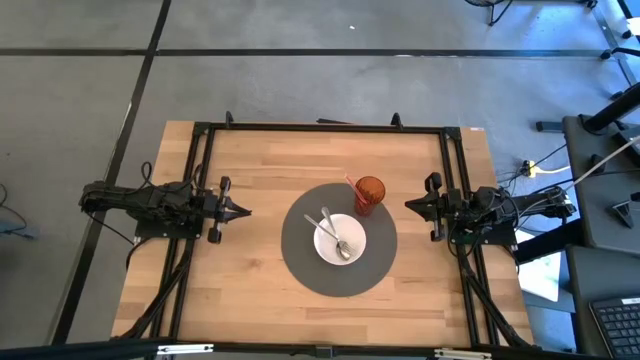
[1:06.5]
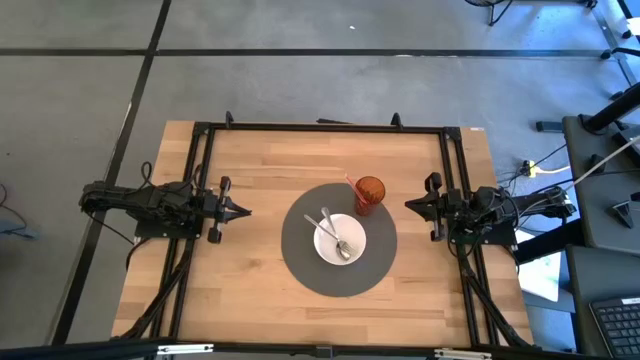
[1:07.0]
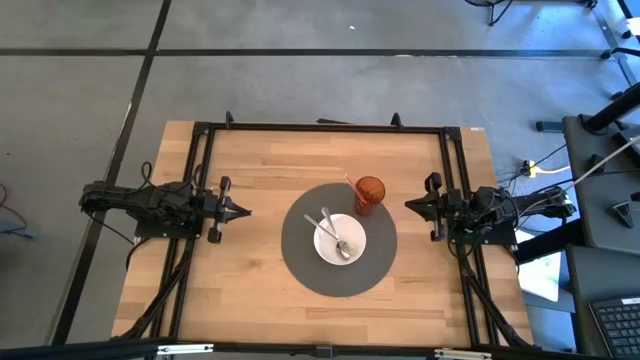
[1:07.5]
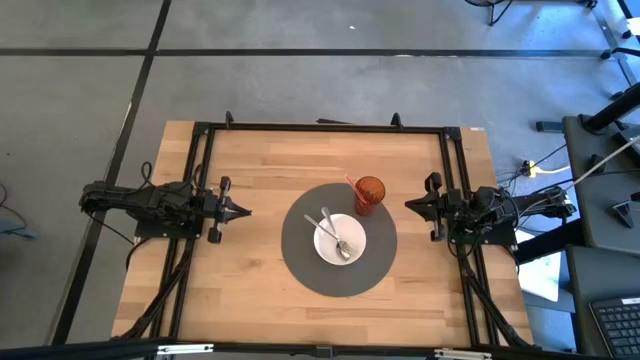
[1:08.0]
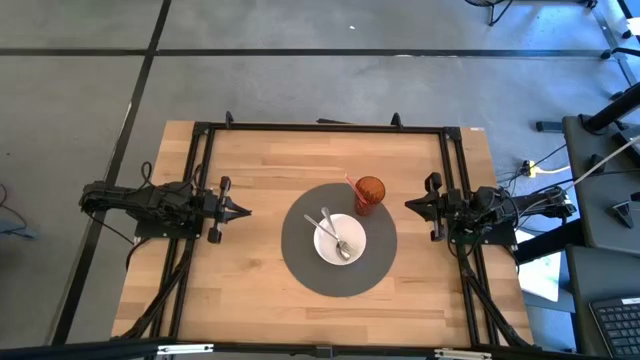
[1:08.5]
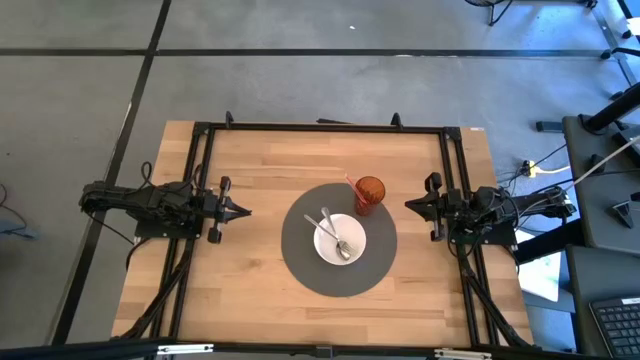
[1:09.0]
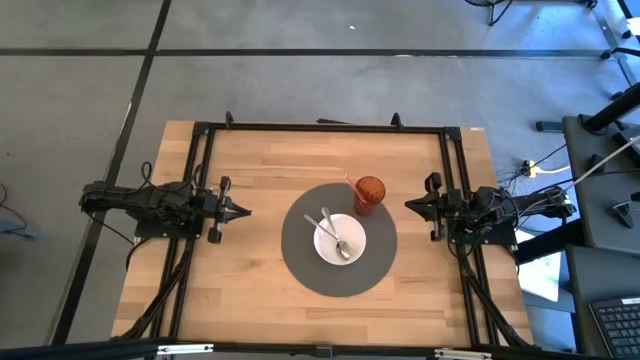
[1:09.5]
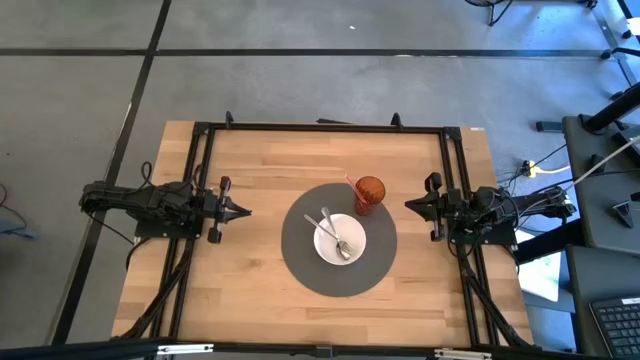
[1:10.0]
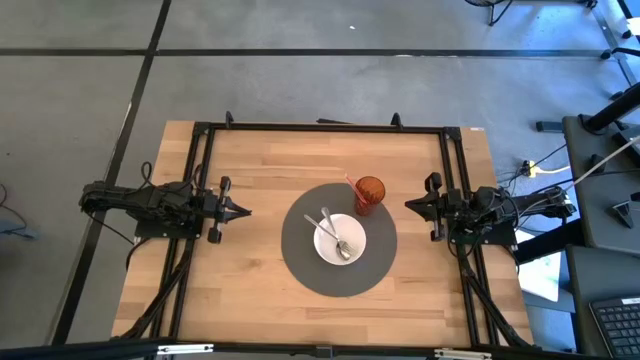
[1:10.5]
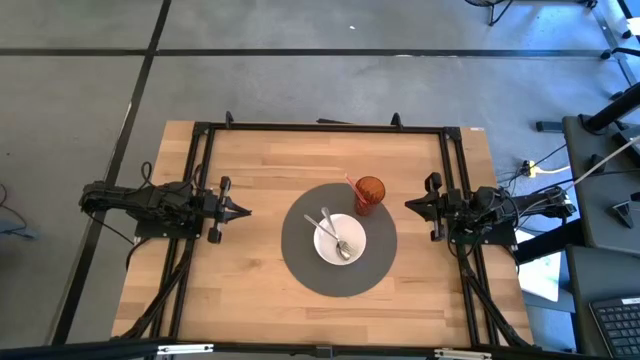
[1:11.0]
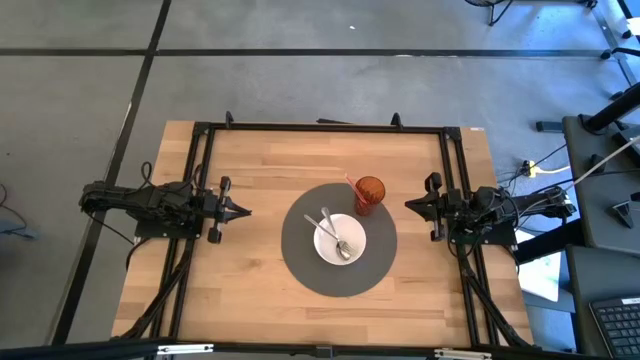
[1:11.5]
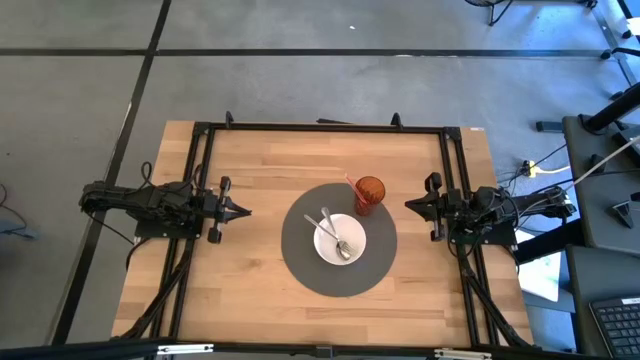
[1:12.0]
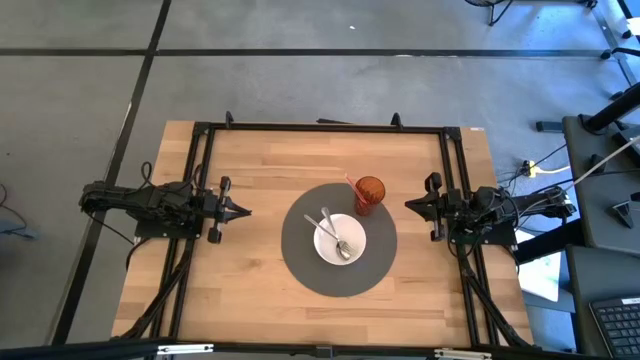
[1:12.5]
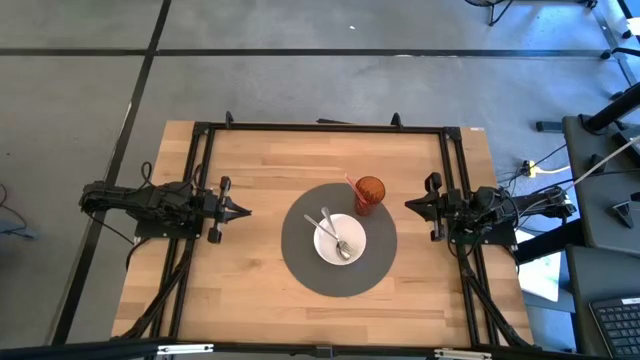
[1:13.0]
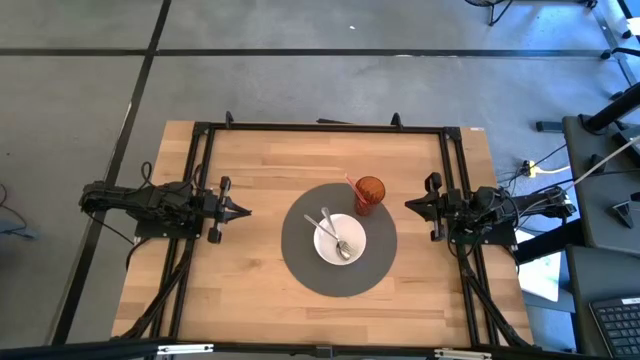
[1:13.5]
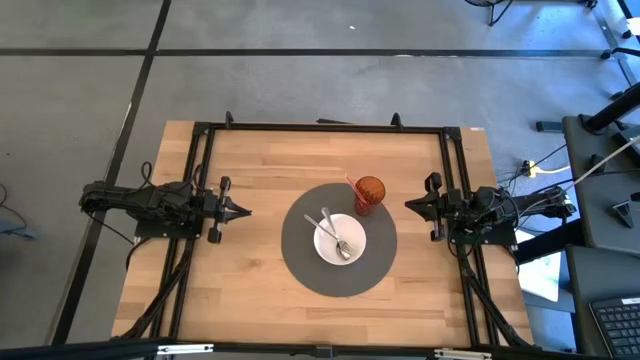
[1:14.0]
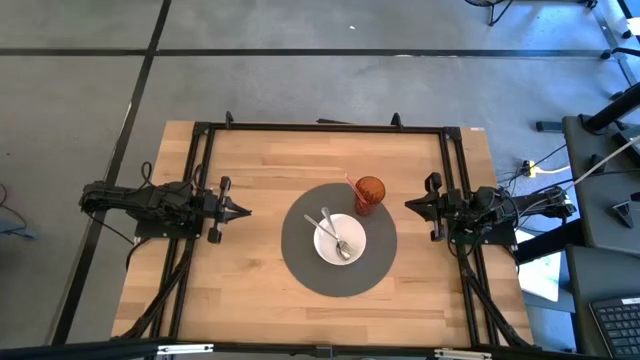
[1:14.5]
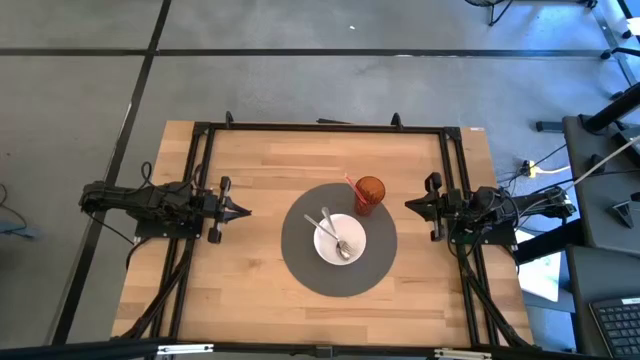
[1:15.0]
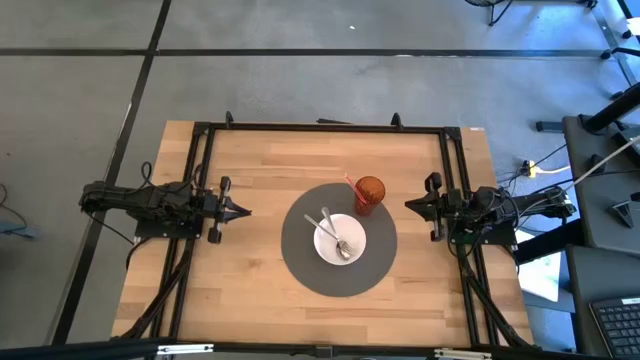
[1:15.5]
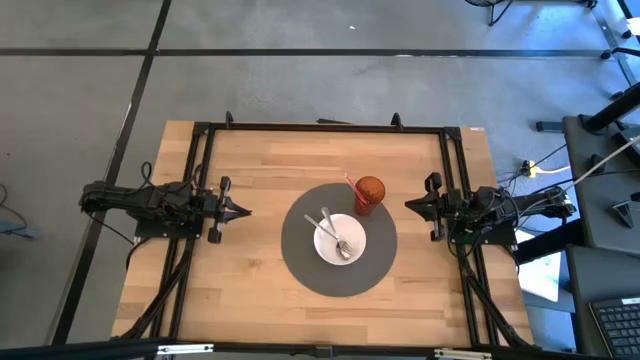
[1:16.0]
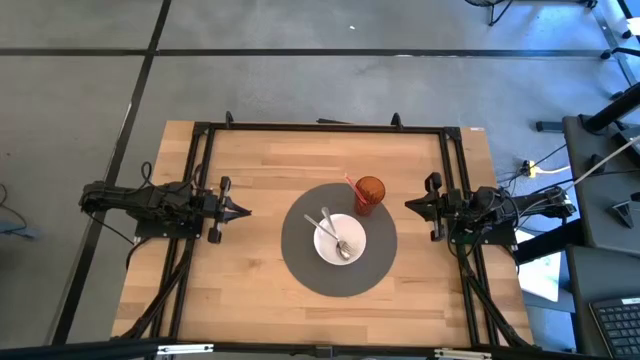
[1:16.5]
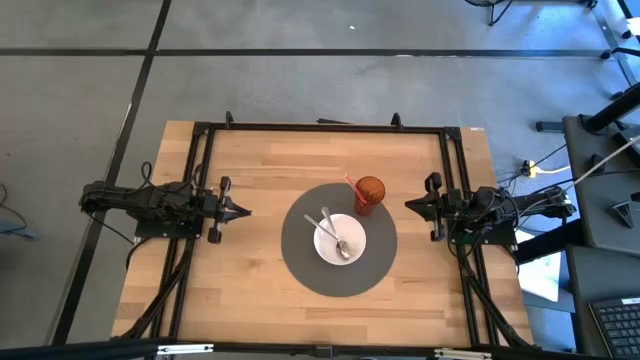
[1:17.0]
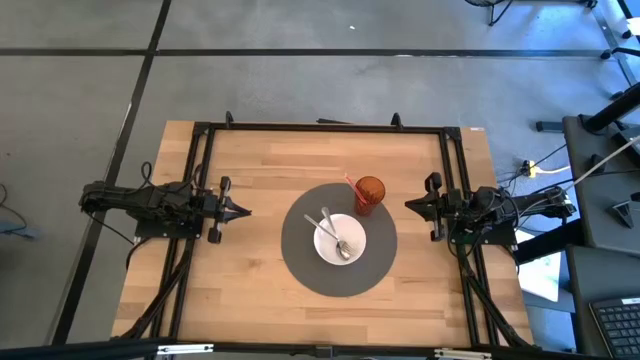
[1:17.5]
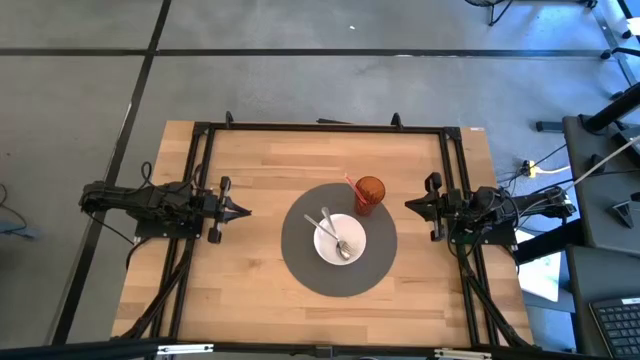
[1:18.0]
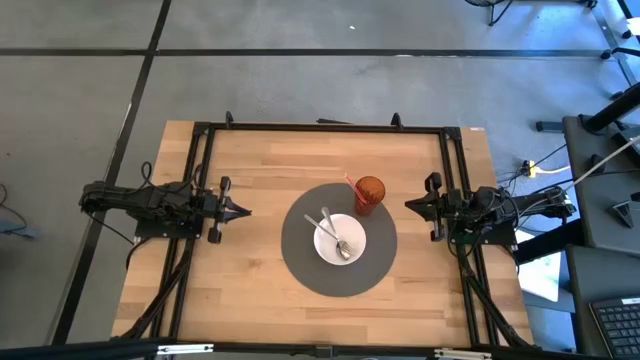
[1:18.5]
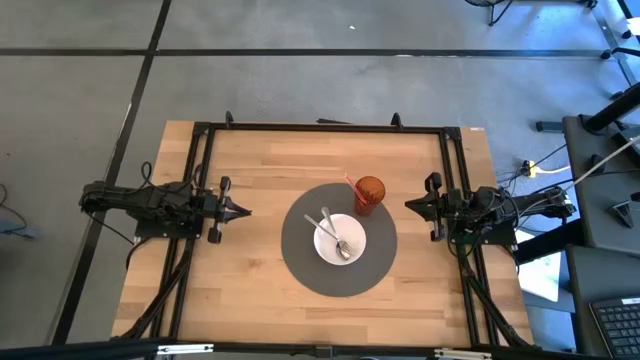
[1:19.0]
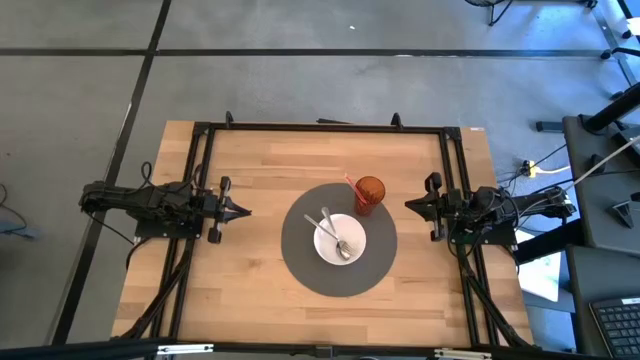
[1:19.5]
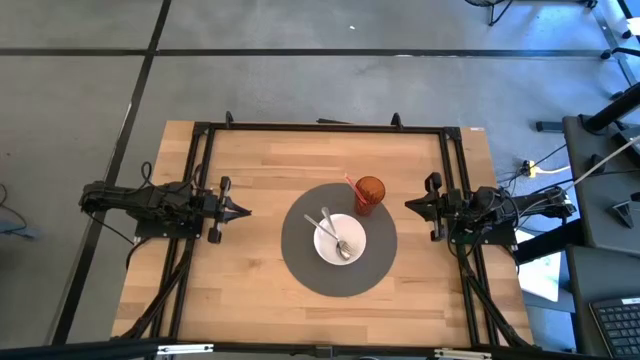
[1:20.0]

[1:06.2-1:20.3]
Task: Pick & Place Utensil
Return to Home Position

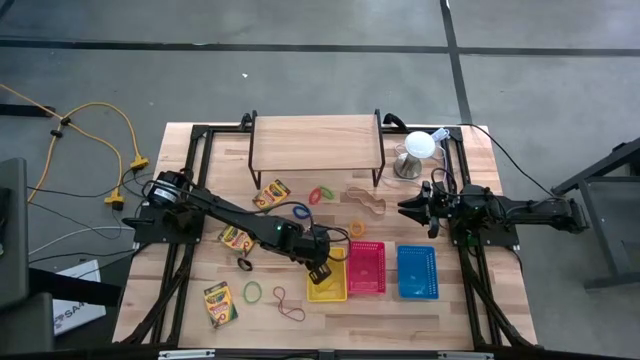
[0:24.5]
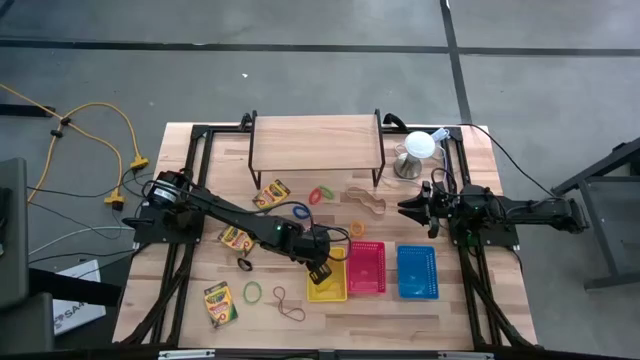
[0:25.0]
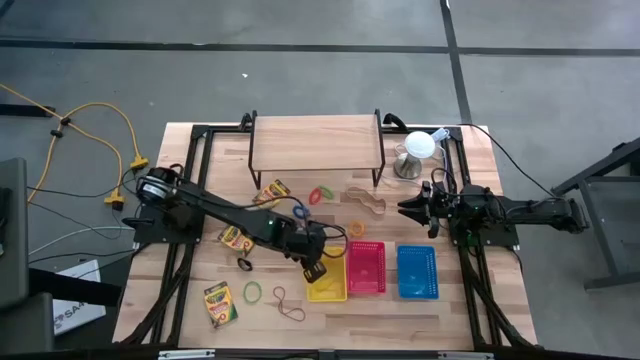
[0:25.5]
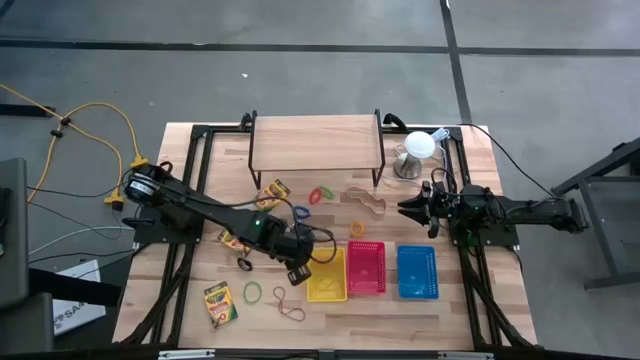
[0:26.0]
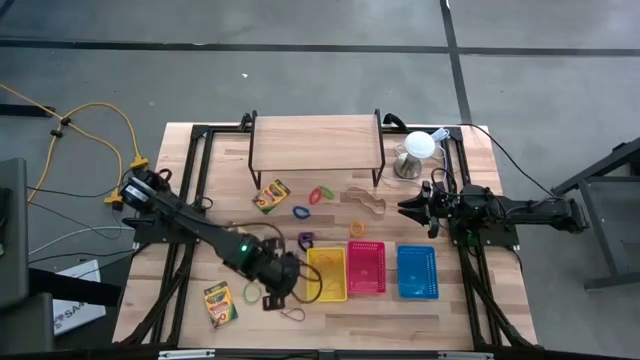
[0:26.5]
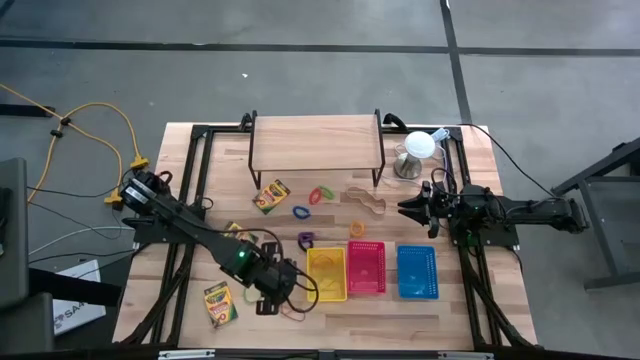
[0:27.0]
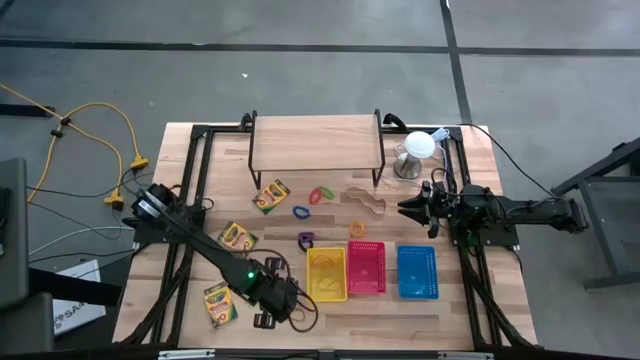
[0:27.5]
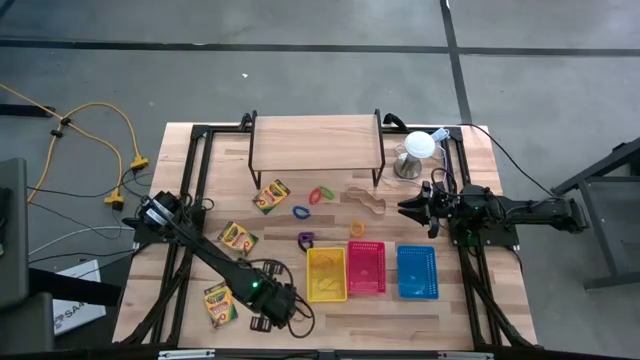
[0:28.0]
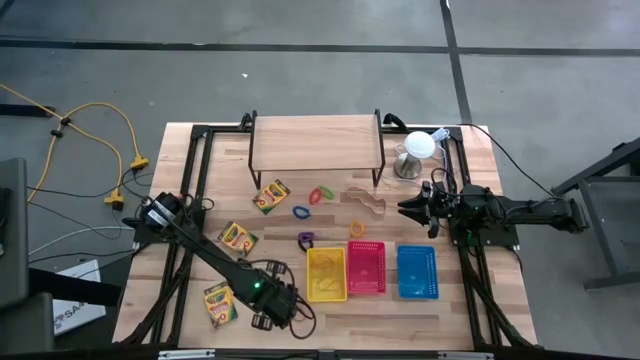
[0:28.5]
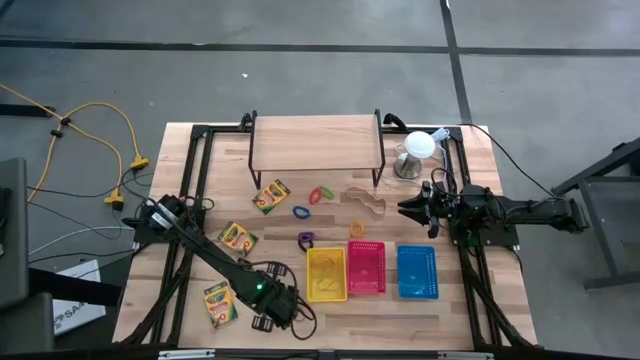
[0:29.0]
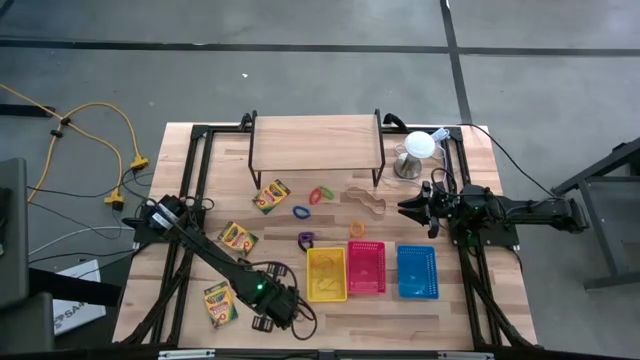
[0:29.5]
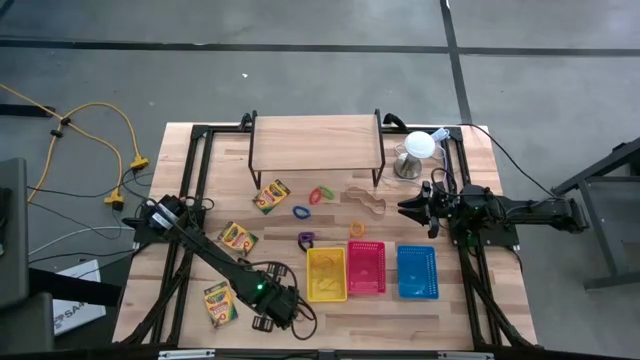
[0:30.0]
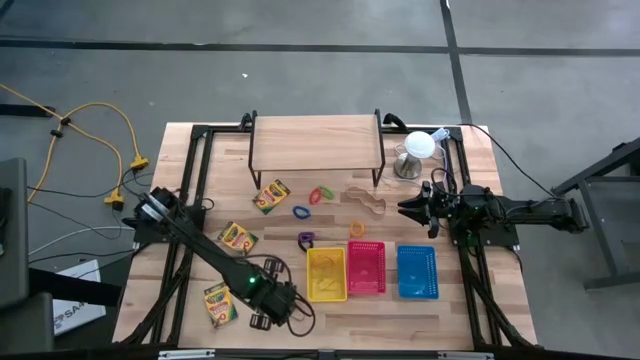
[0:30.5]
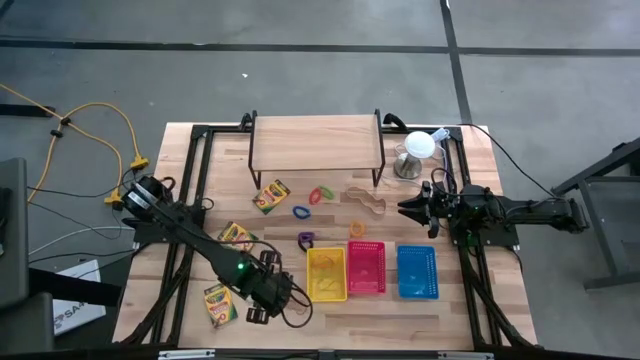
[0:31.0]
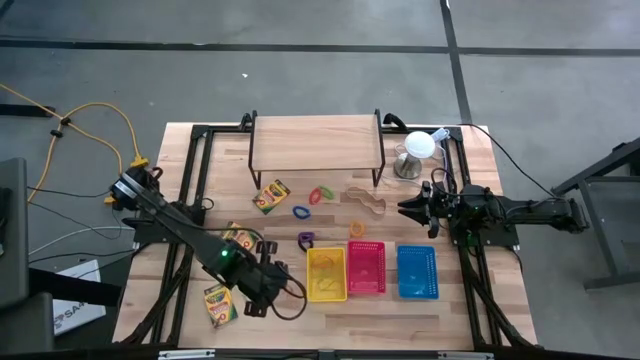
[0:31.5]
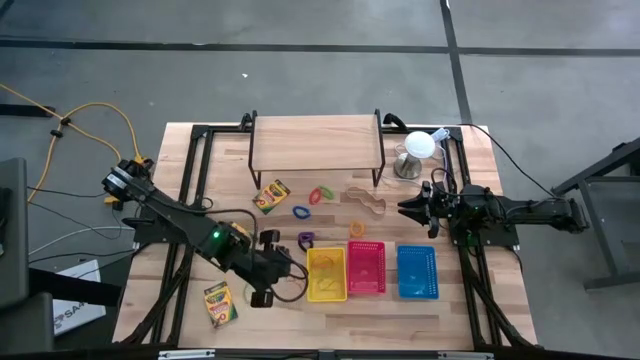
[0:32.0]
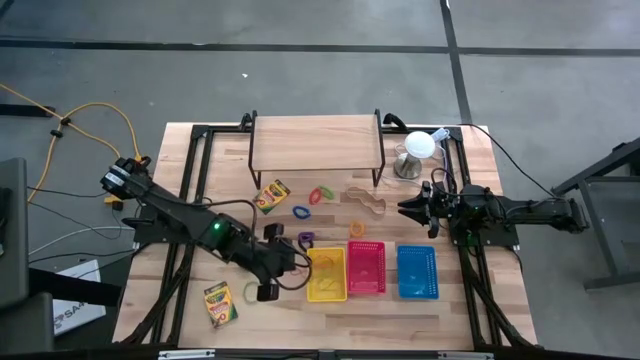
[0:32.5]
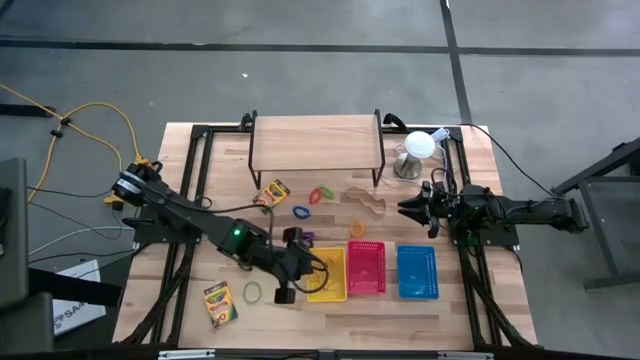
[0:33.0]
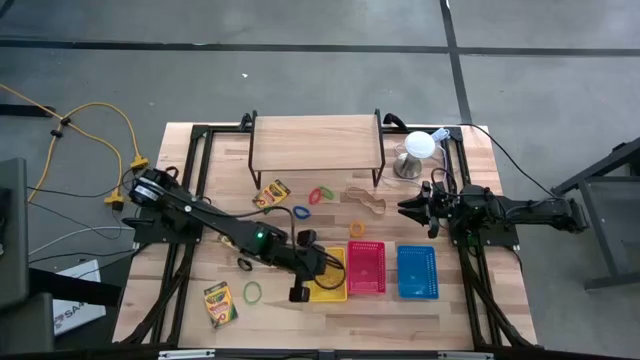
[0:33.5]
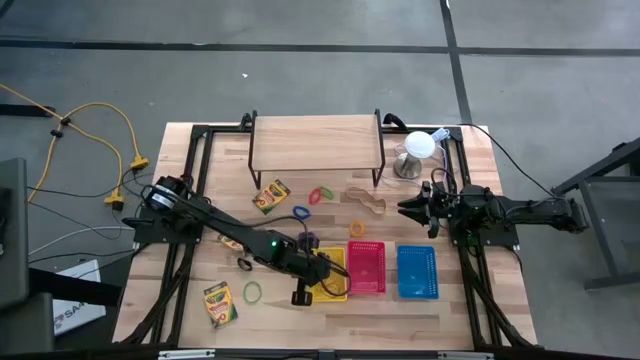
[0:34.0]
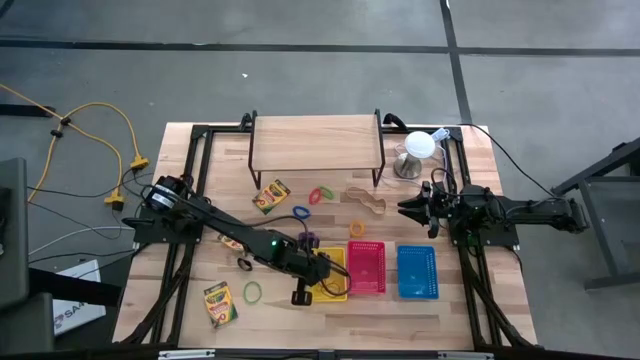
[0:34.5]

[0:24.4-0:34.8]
Task: Pick & Place Office Desk Supplies
Put the red rubber band into the yellow bin
